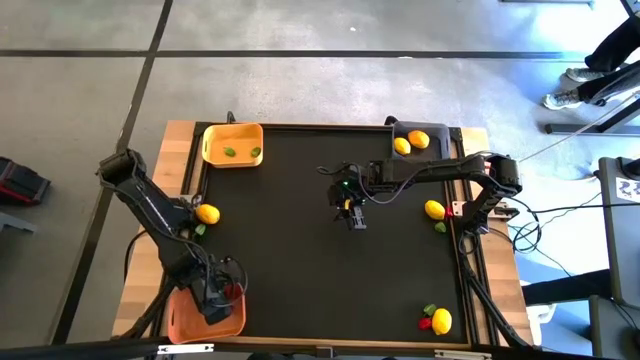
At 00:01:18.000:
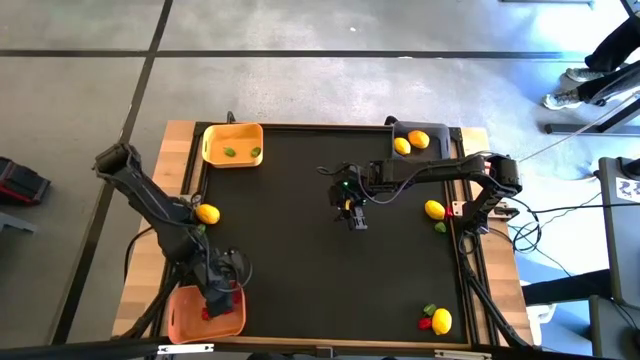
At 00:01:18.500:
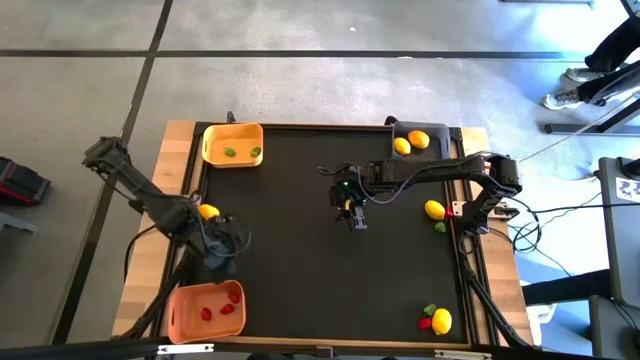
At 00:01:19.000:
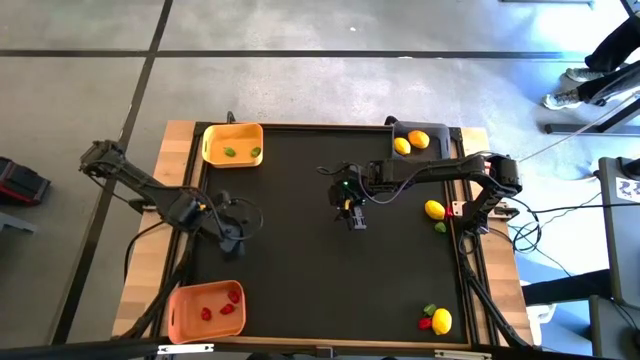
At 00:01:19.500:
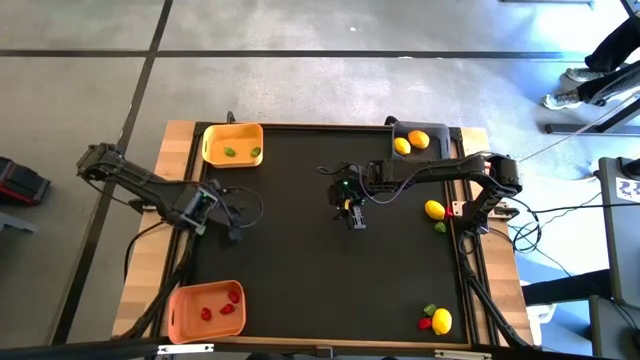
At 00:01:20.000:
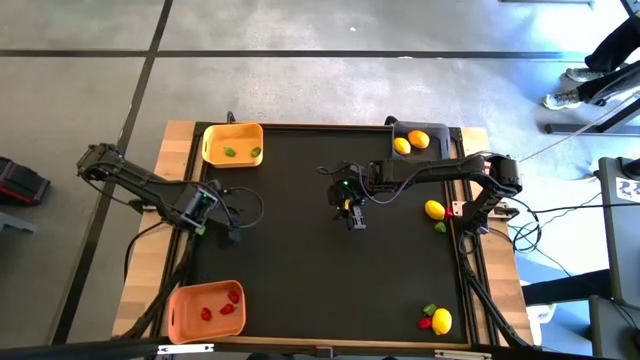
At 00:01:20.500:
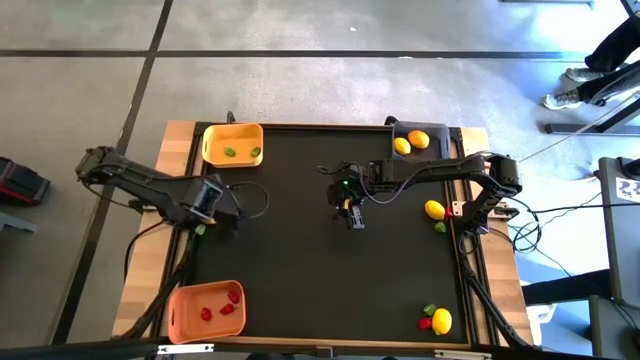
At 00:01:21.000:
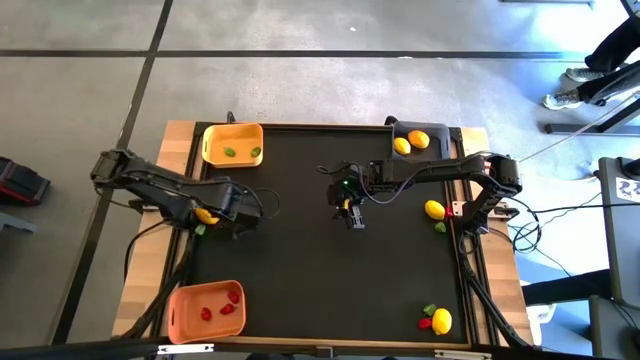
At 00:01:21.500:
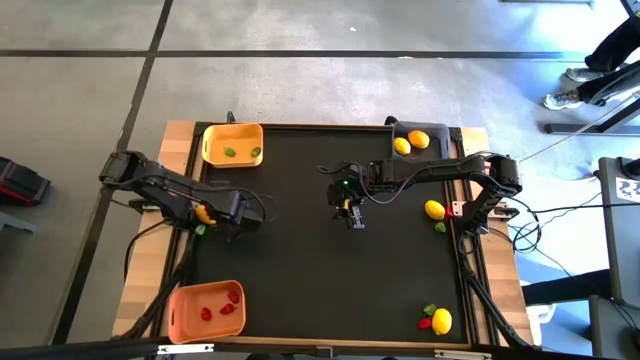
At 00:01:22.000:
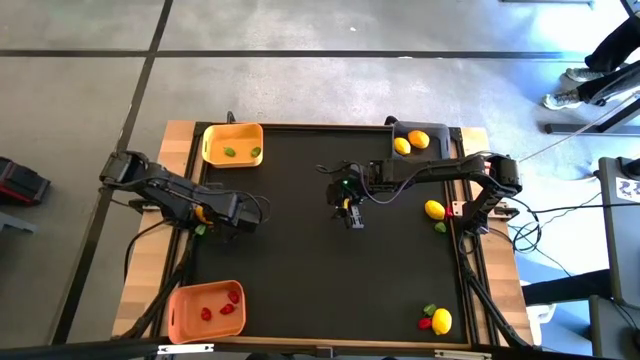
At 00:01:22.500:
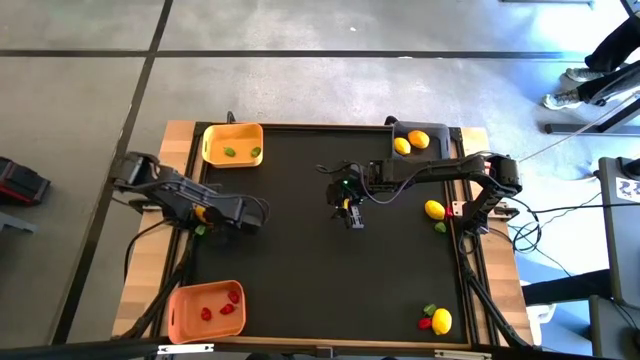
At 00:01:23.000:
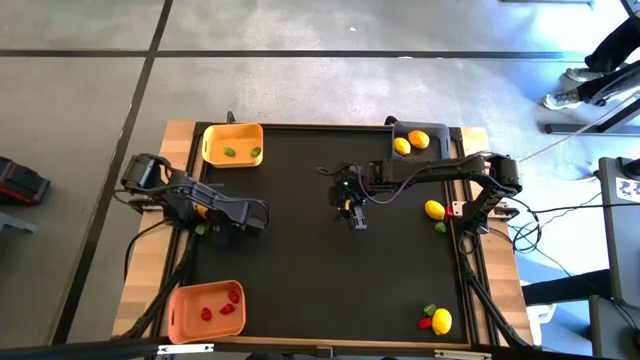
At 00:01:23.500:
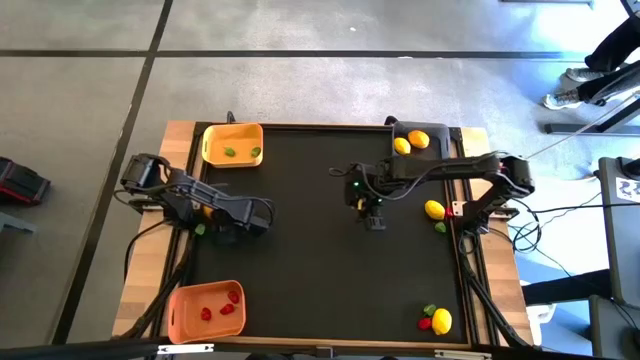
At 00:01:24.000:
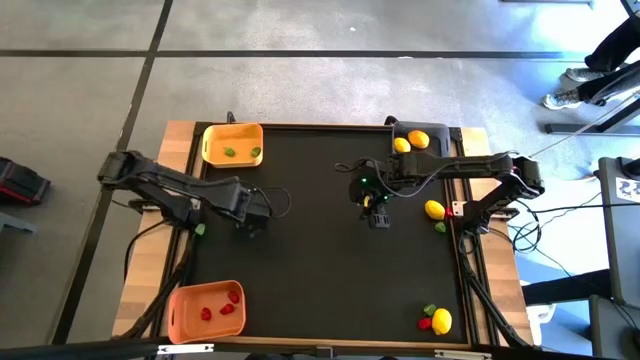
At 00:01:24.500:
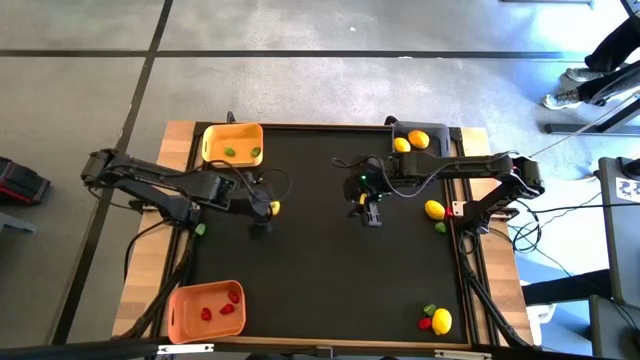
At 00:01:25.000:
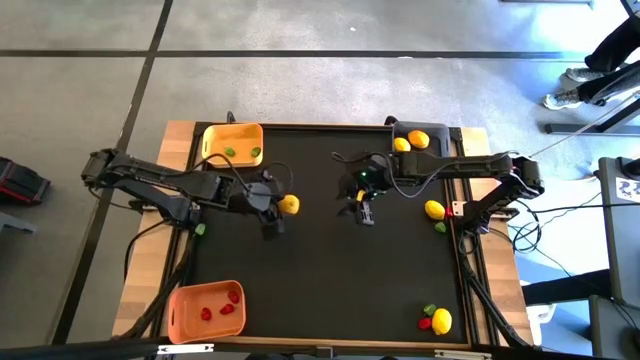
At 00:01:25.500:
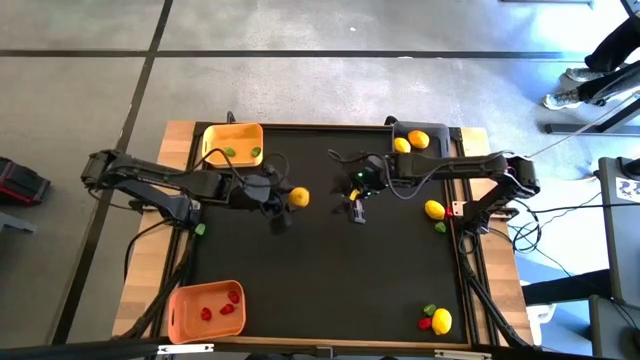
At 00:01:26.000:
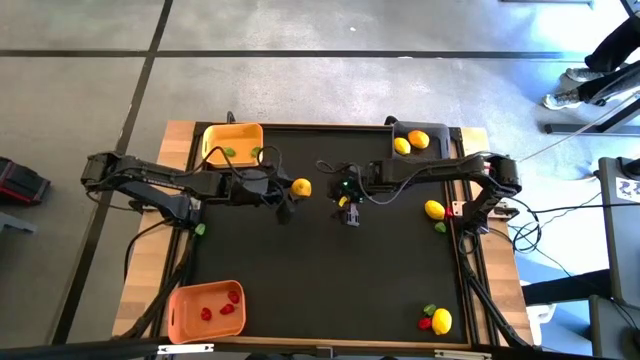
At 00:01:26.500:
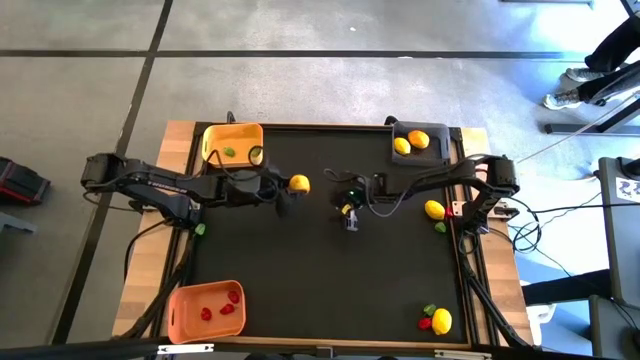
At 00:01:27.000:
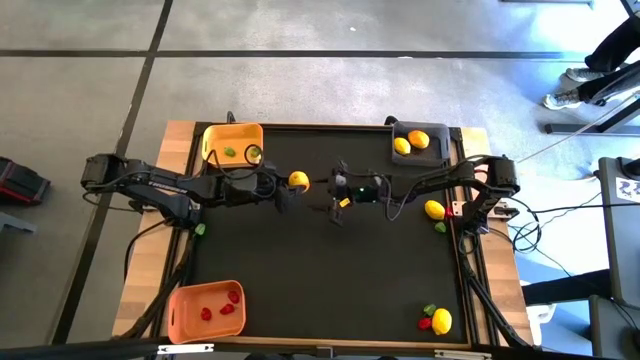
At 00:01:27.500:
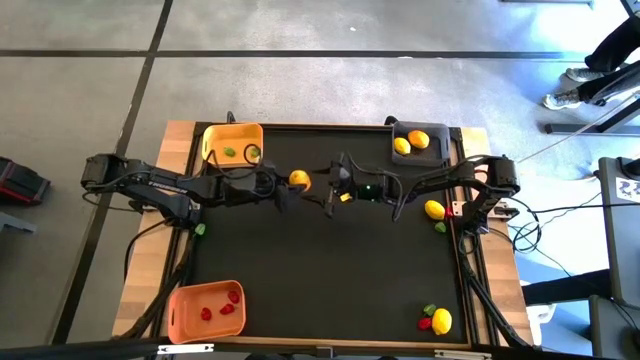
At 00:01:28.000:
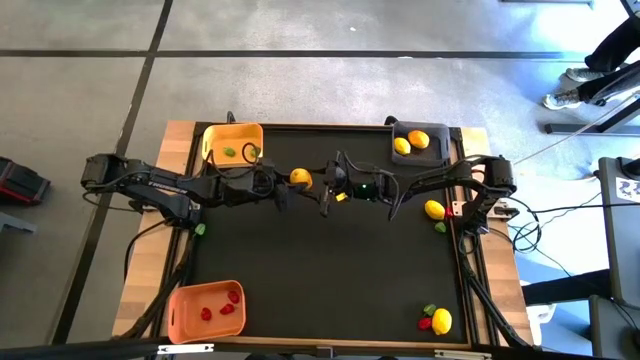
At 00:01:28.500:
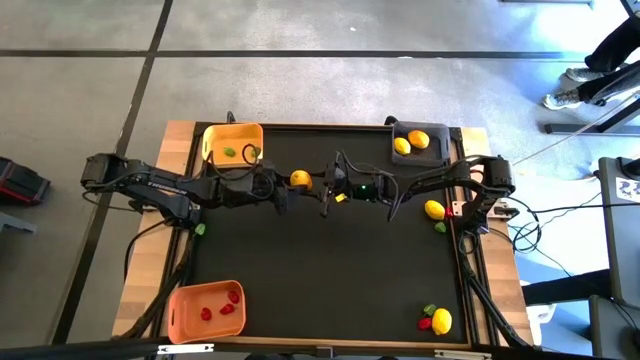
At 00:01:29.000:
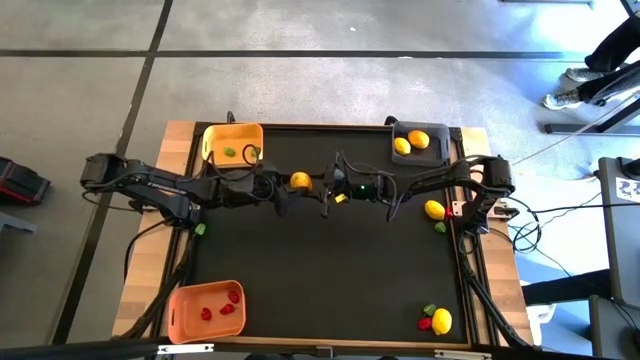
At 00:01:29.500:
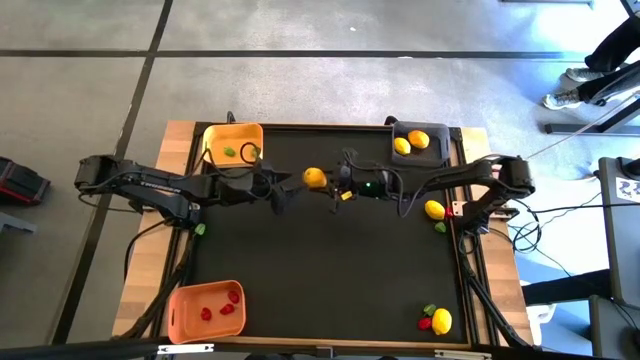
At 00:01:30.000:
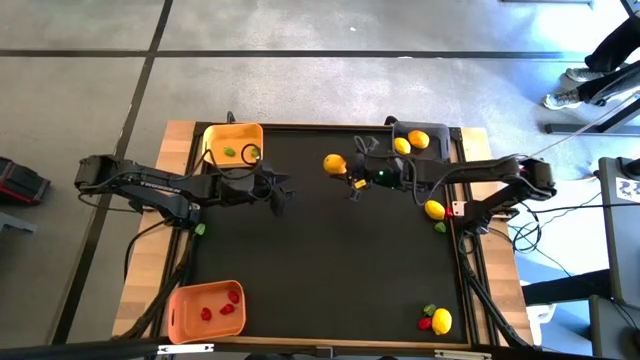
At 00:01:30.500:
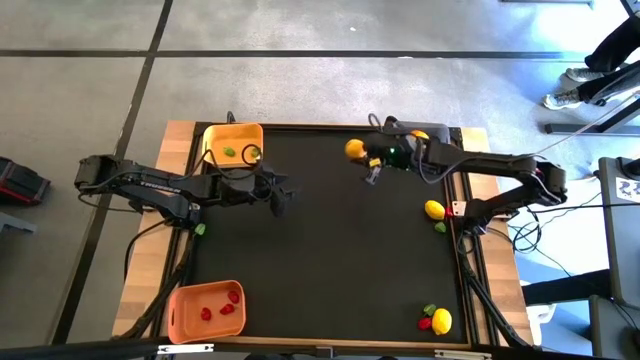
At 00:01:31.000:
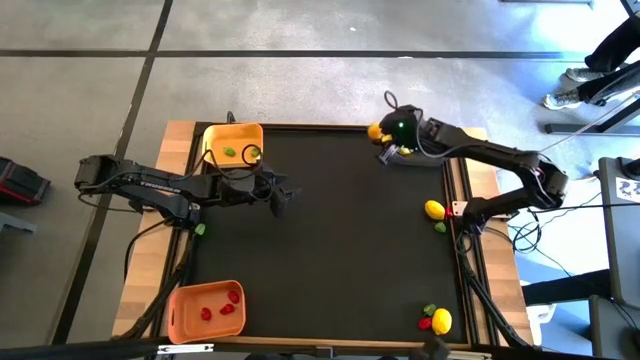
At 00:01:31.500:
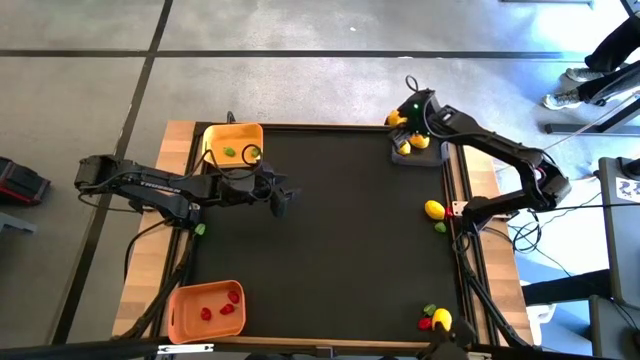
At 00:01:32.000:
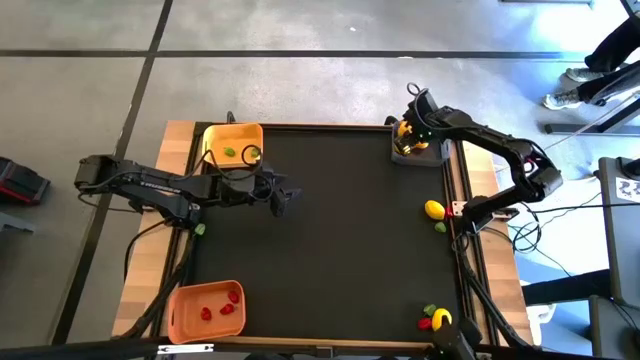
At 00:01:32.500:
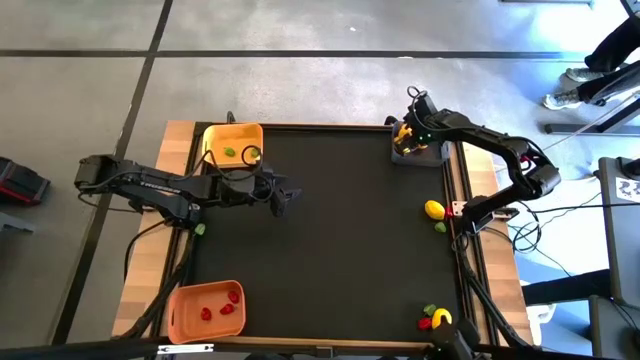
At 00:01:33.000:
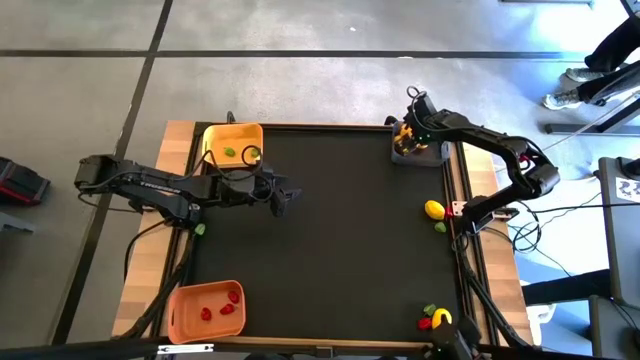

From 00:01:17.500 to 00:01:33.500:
Task: Sort produce into baskets
Put the yellow lemon into the black bin

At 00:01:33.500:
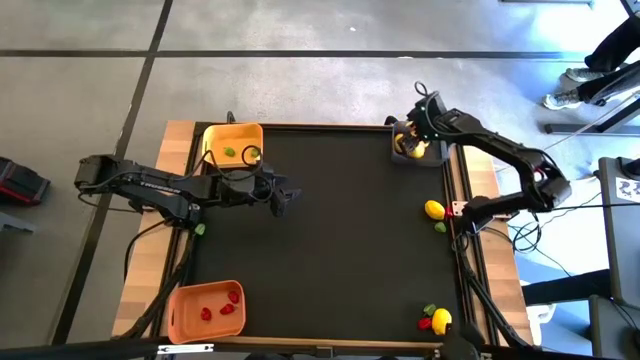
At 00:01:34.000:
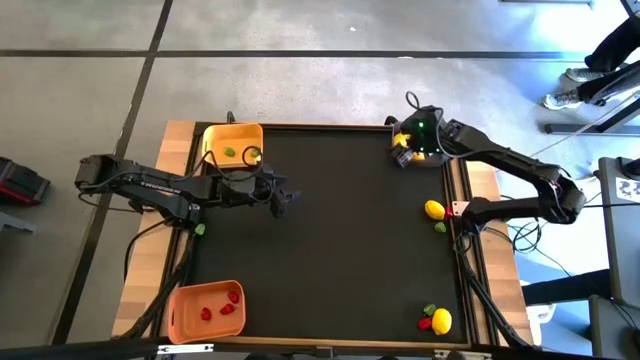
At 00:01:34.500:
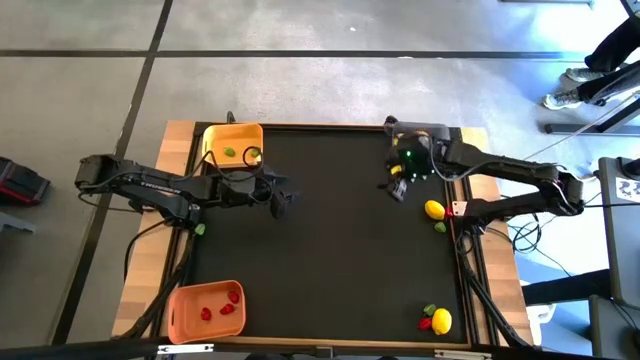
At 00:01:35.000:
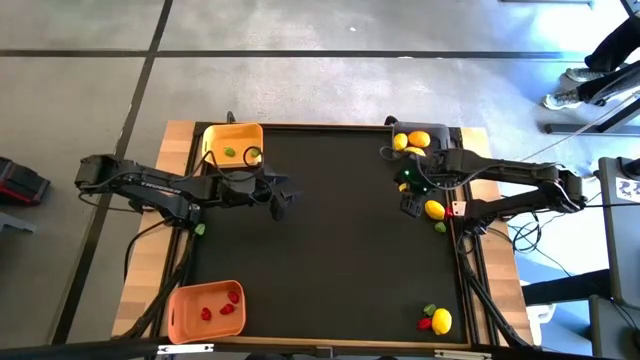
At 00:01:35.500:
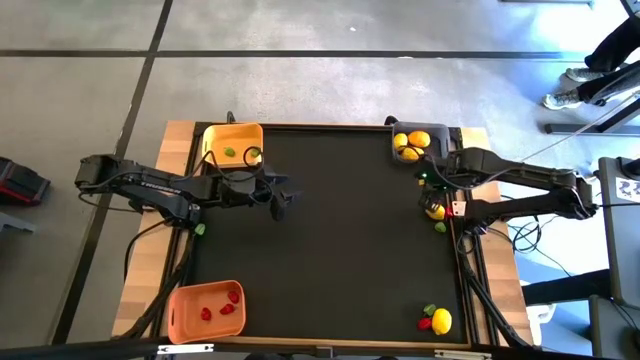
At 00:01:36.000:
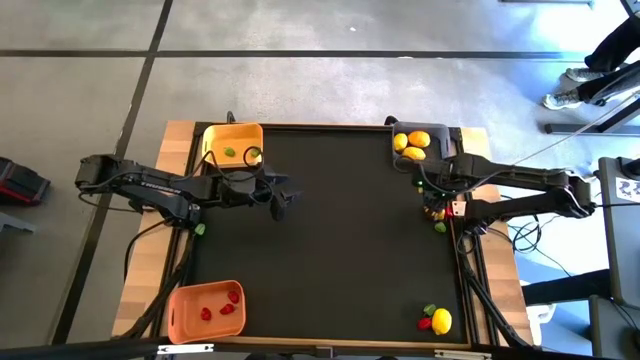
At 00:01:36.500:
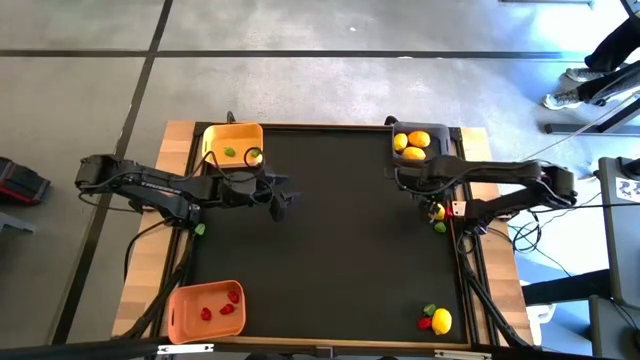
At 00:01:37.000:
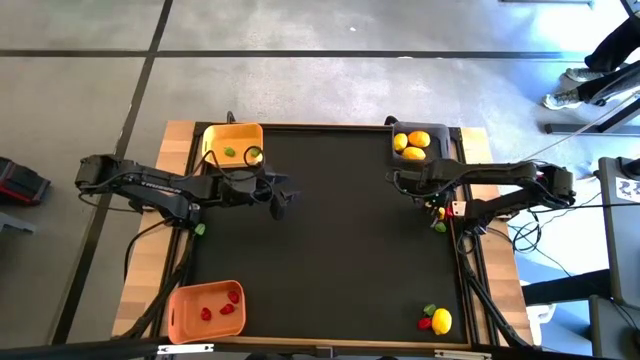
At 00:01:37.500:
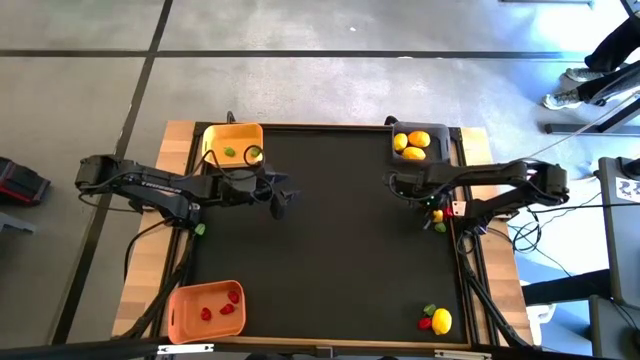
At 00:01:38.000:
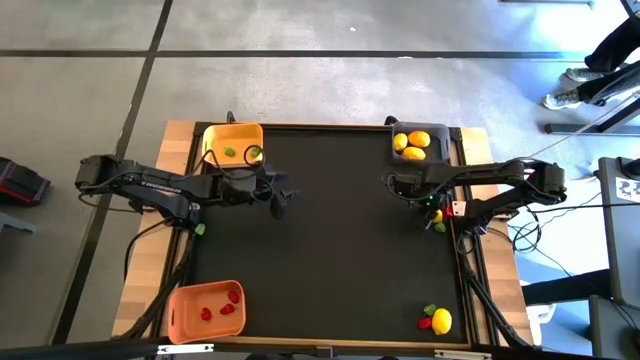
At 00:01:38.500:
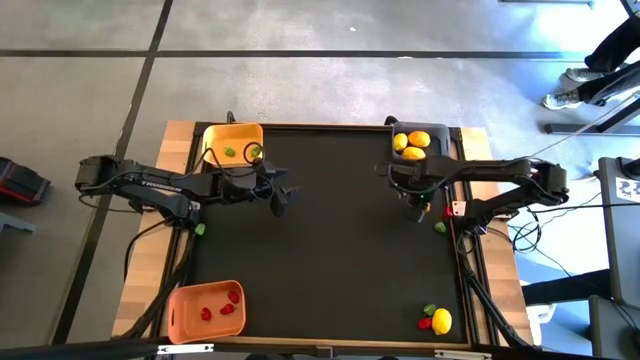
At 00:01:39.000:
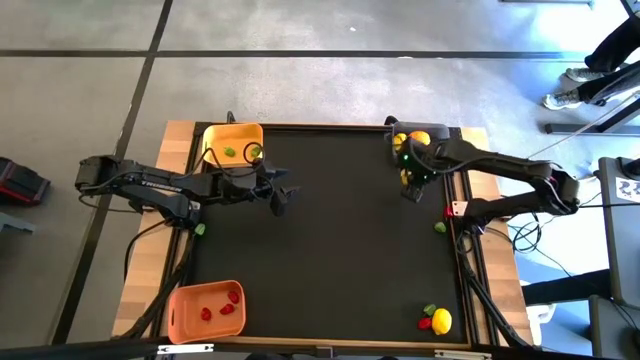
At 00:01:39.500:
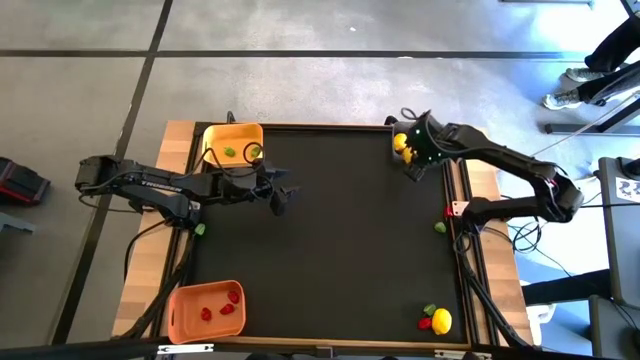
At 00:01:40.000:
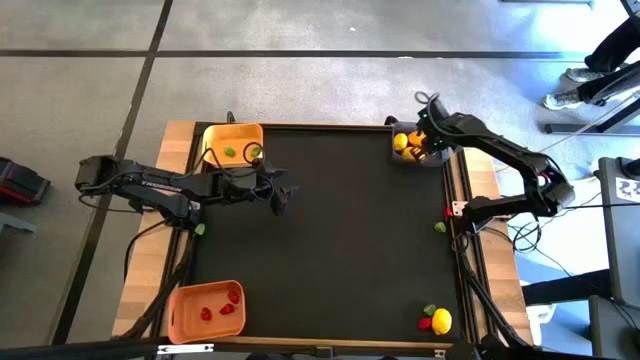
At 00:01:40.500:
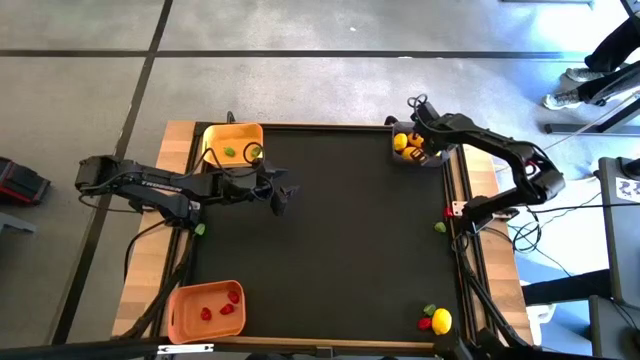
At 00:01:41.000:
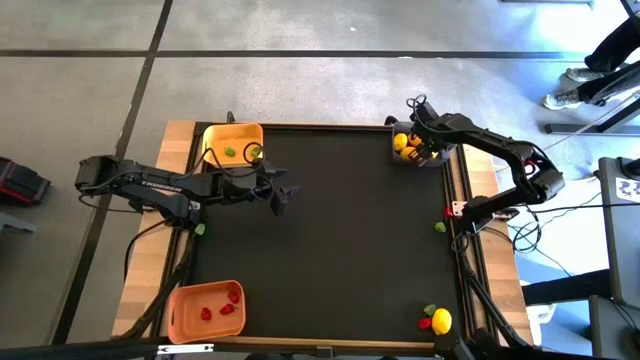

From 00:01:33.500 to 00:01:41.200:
Put the yellow lemon into the black bin
